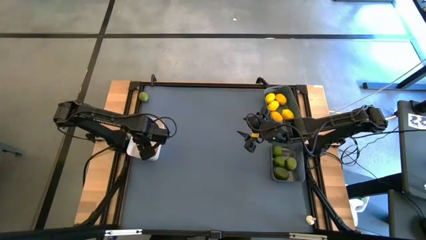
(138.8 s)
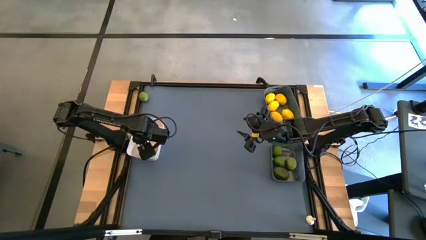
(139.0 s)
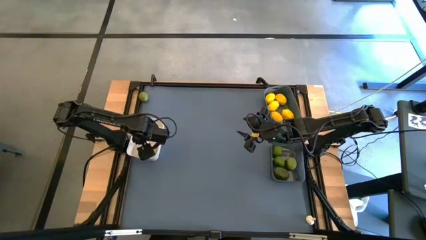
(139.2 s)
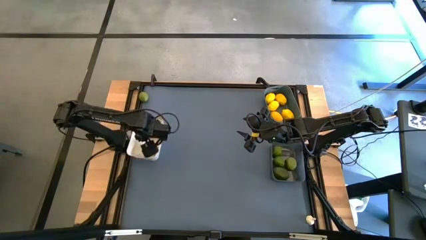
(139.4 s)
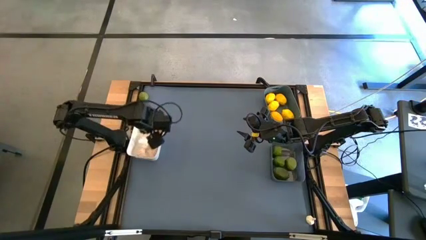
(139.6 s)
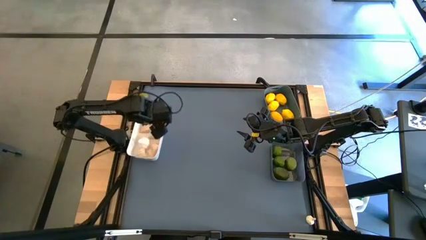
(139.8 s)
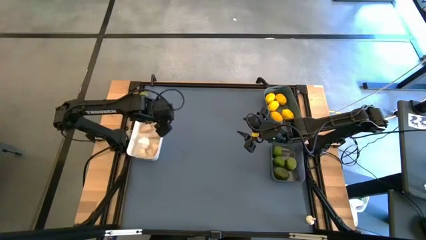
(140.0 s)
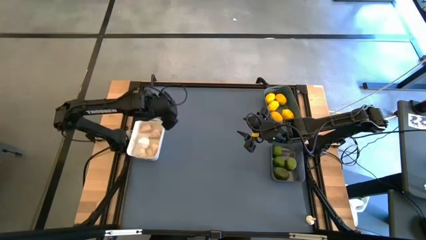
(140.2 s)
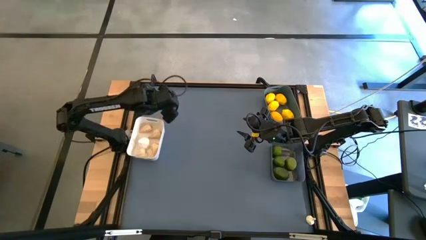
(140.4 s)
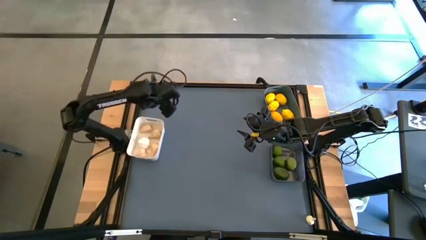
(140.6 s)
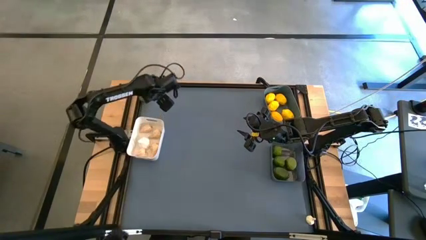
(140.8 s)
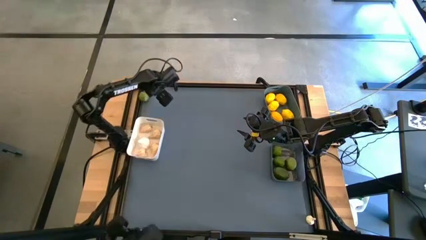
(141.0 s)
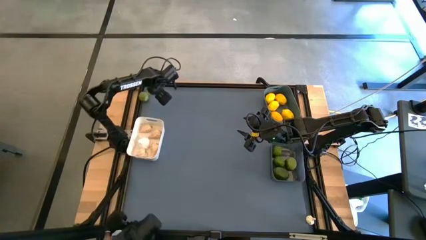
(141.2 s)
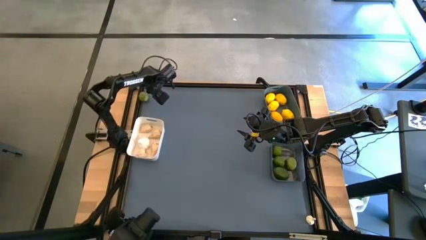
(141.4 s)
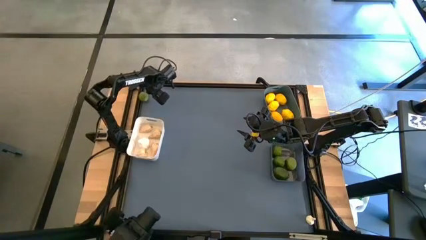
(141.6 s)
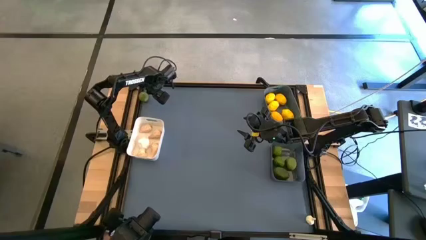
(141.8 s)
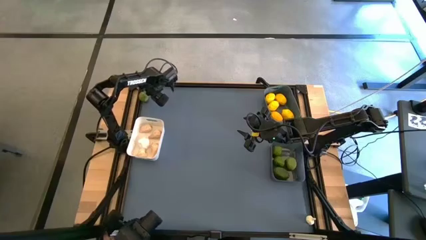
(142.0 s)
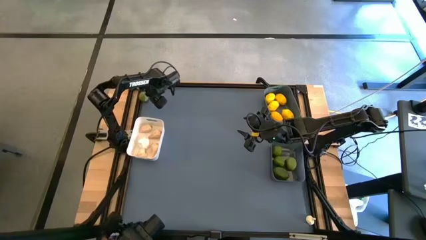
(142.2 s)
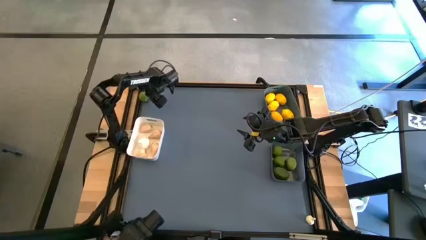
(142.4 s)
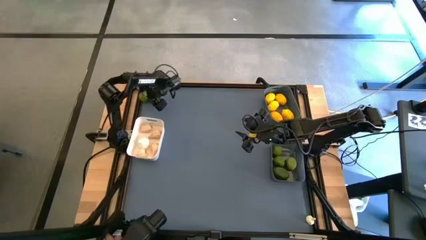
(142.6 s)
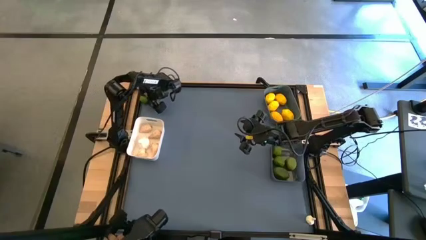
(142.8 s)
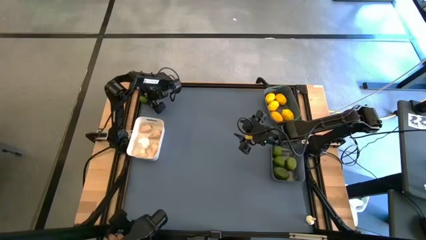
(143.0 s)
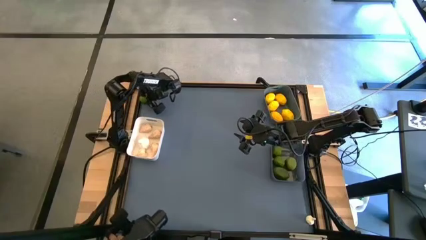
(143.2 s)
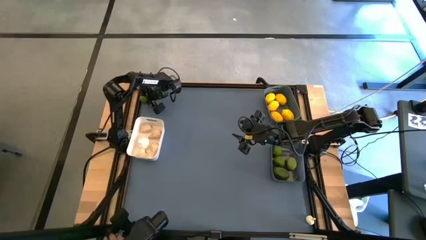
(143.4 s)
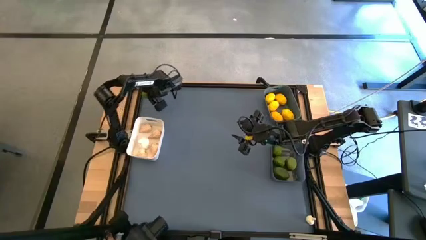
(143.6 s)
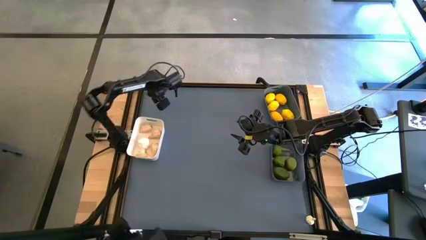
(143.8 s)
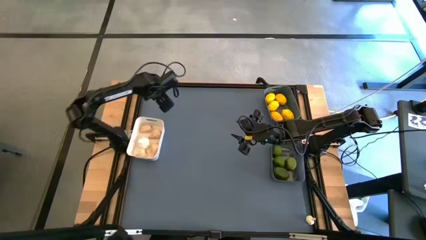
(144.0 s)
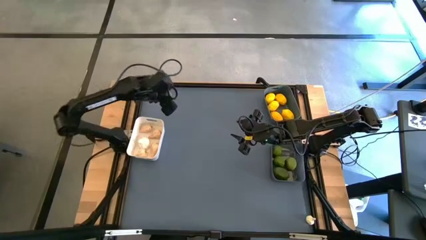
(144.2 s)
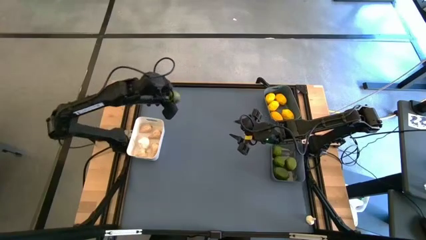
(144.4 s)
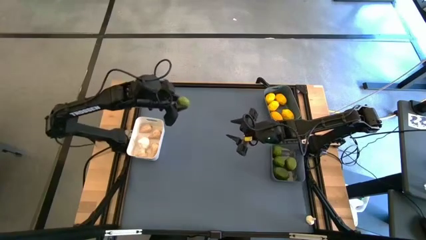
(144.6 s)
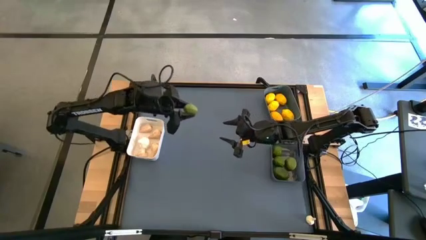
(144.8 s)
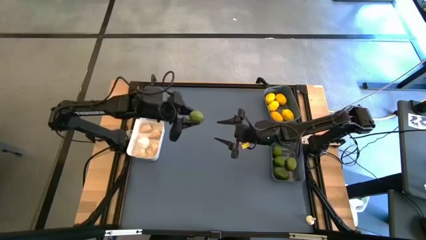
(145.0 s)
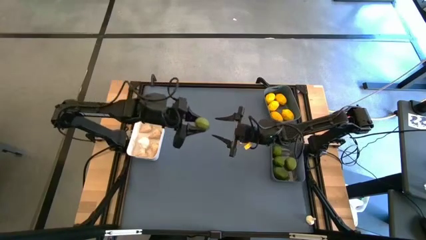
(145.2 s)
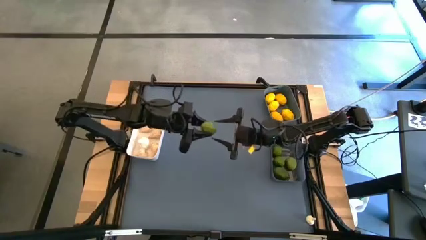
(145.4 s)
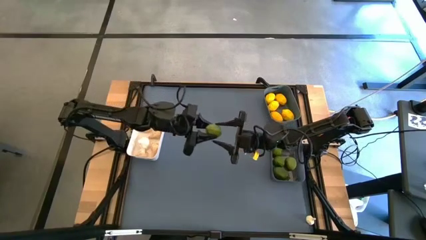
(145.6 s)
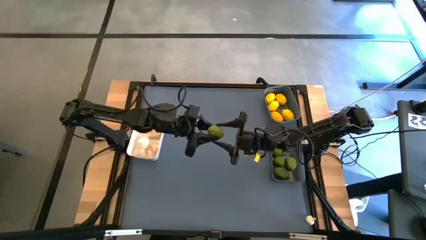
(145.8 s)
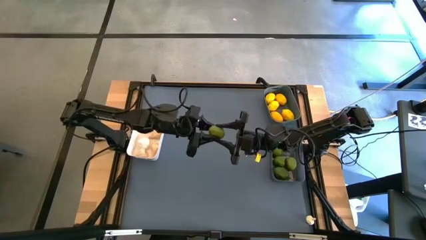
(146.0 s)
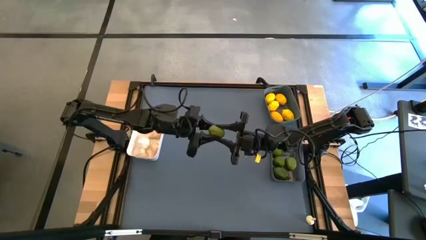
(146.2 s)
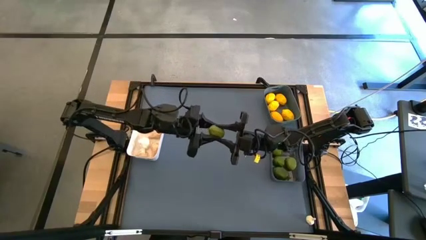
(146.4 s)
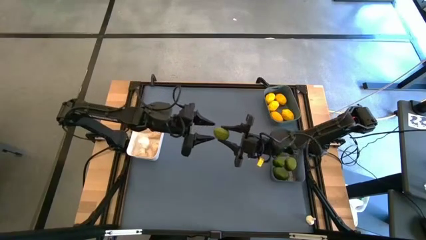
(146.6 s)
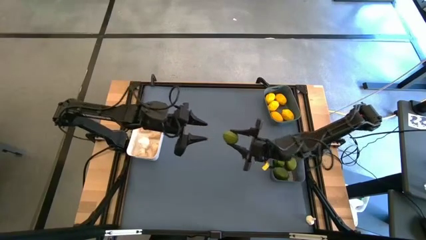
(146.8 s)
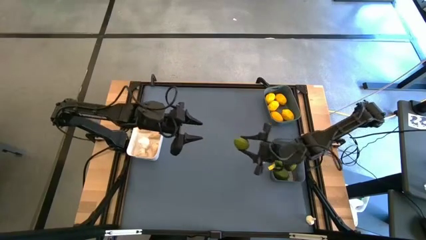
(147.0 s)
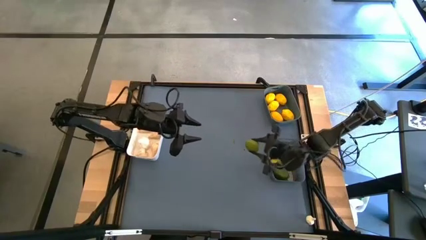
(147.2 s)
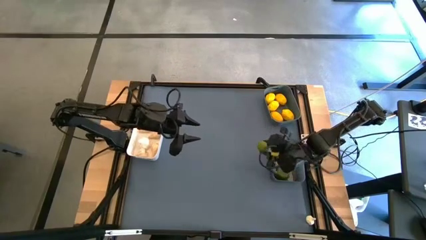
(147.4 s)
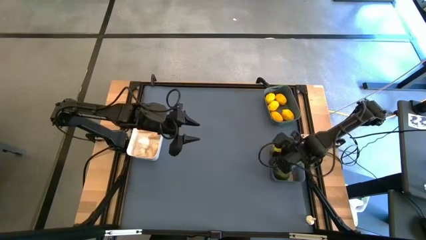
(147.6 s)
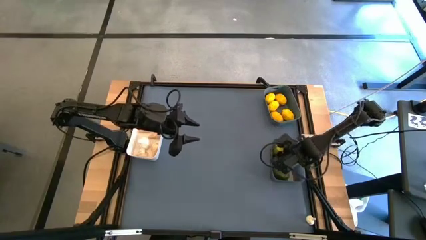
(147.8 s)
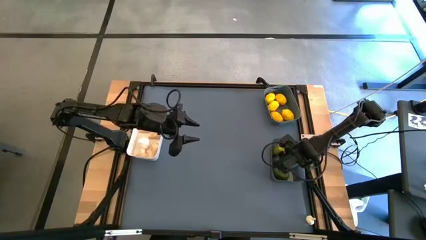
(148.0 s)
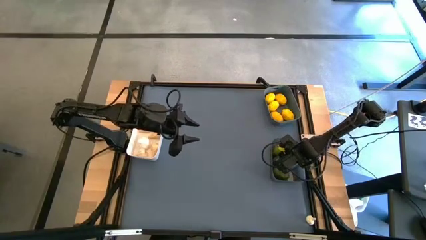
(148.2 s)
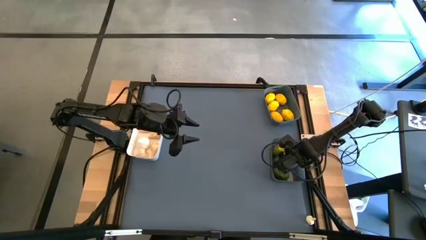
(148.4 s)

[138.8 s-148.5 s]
Task: Sort produce into baskets
Put the lime into the black bin

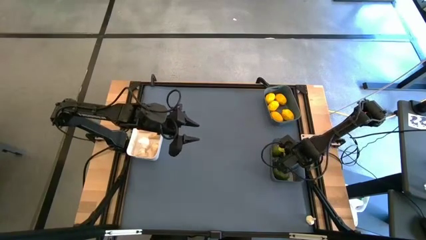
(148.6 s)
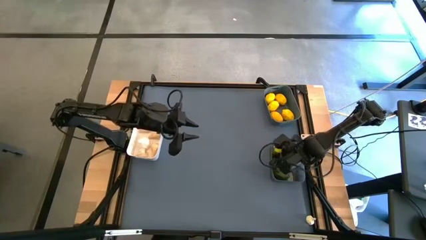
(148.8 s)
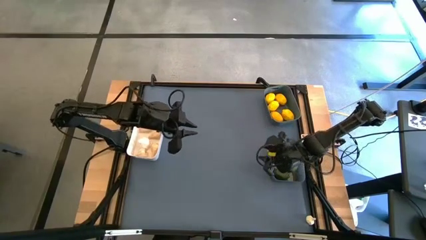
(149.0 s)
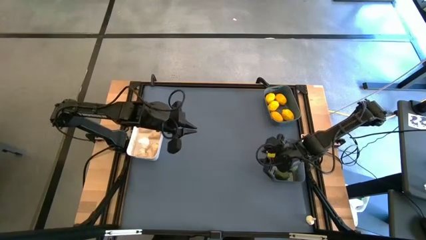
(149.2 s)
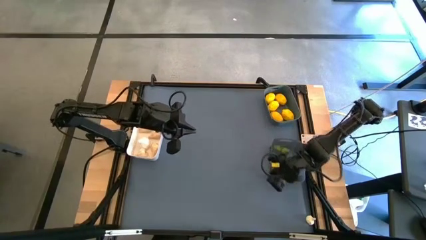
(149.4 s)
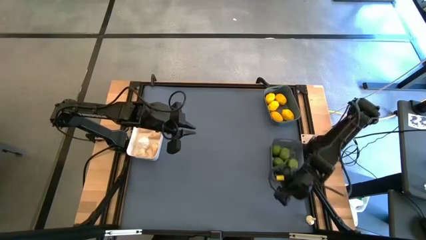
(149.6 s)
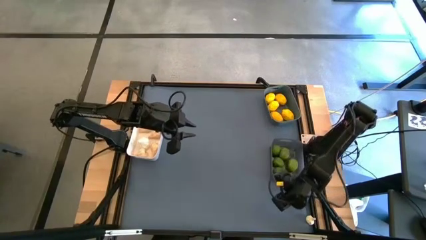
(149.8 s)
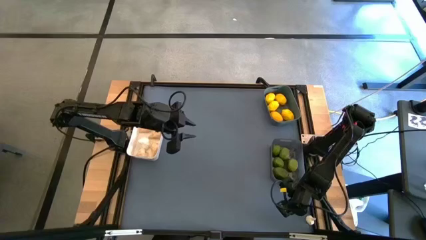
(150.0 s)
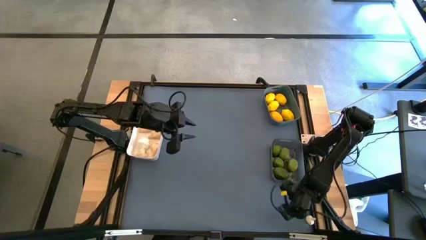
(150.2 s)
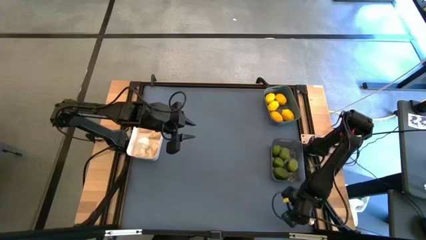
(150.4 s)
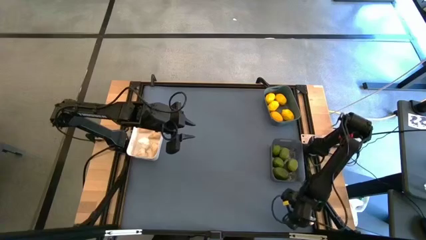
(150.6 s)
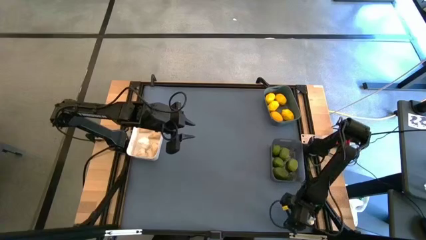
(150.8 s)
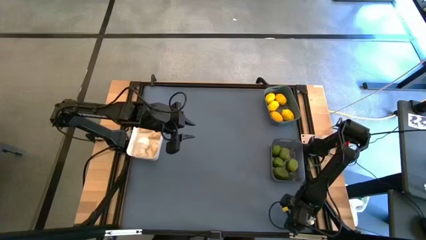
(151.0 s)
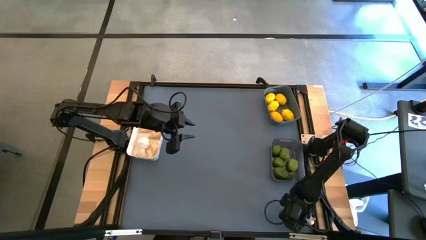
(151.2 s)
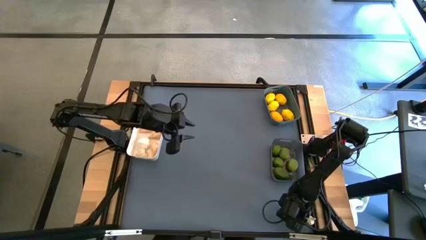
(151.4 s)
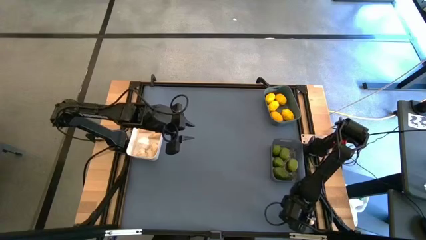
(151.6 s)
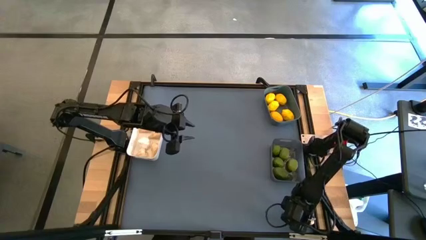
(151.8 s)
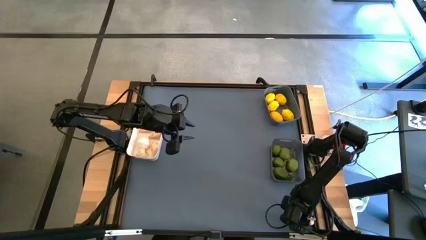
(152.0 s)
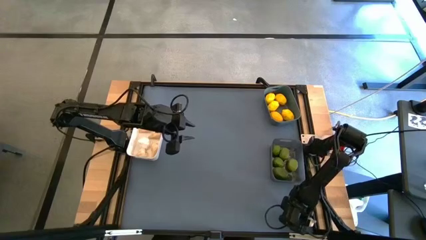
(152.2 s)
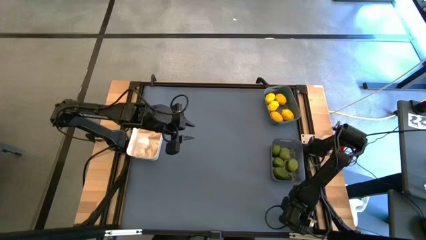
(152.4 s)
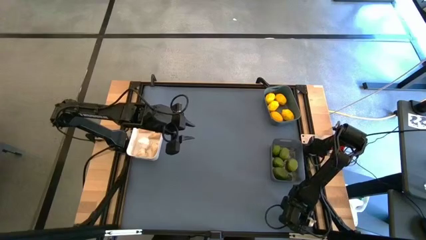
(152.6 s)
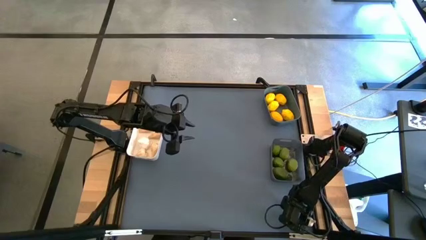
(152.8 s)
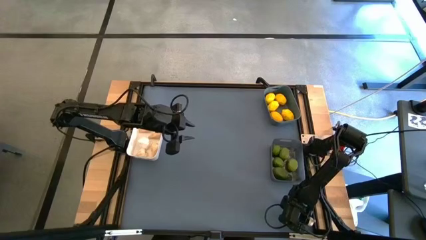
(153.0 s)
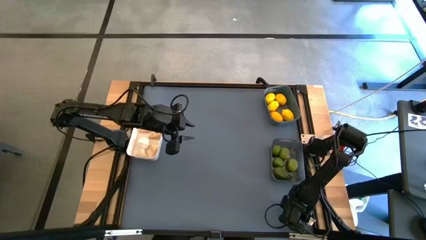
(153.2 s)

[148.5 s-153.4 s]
Put the garlic into the white bin

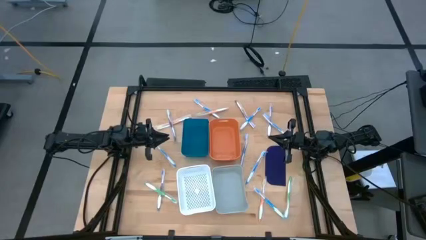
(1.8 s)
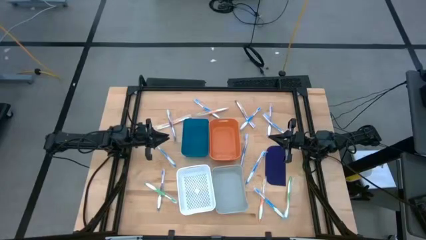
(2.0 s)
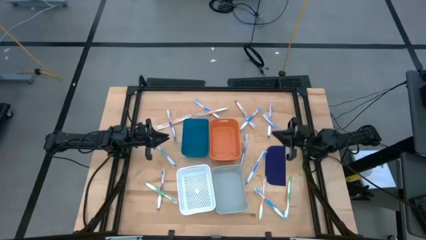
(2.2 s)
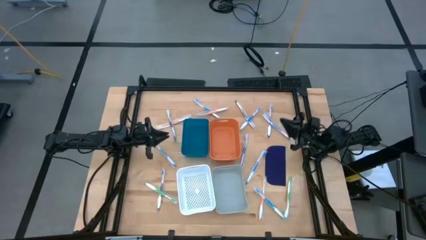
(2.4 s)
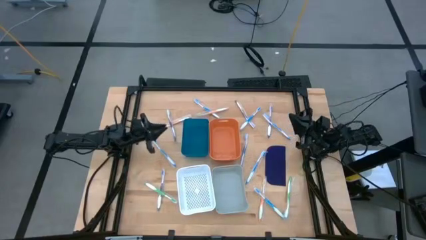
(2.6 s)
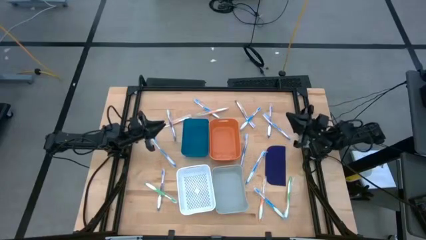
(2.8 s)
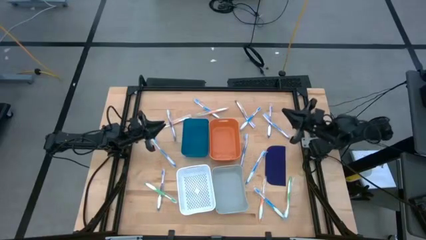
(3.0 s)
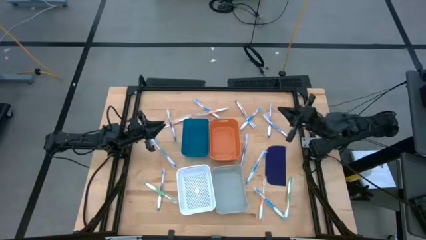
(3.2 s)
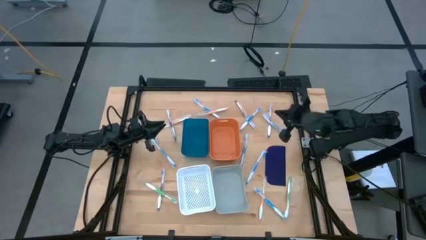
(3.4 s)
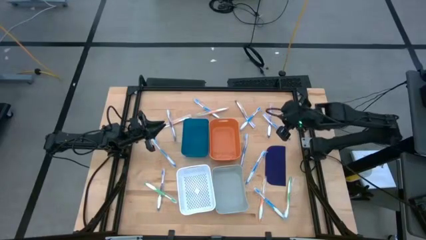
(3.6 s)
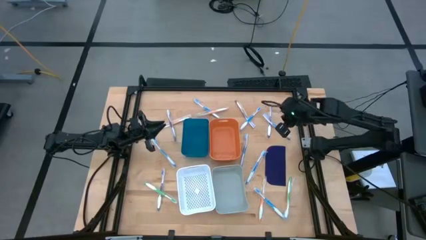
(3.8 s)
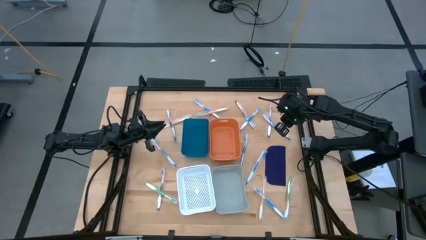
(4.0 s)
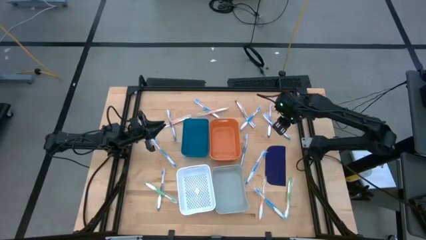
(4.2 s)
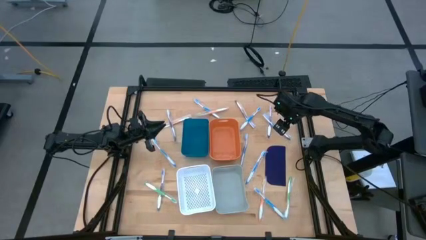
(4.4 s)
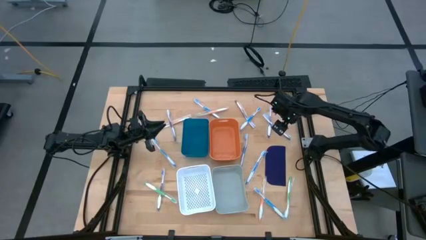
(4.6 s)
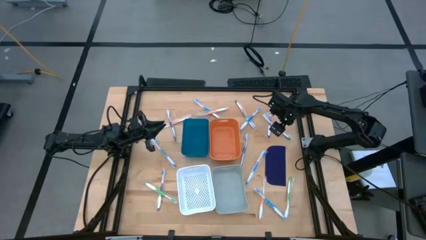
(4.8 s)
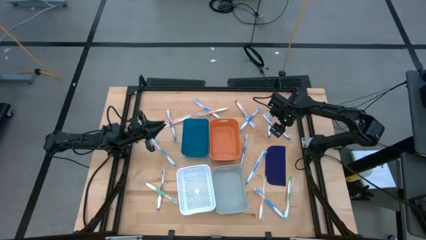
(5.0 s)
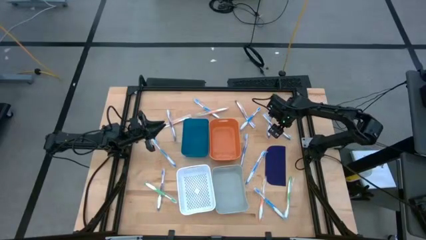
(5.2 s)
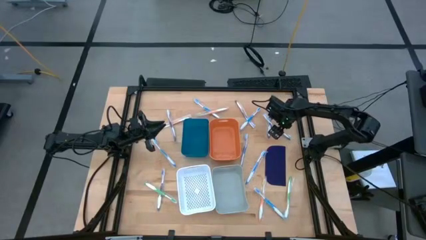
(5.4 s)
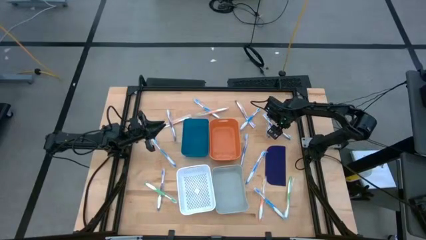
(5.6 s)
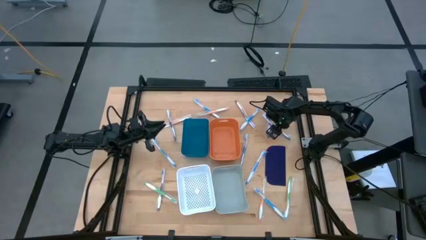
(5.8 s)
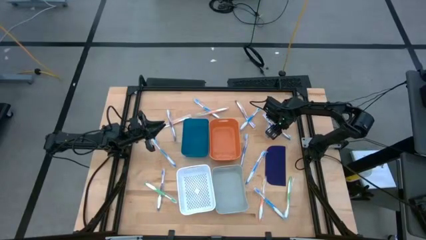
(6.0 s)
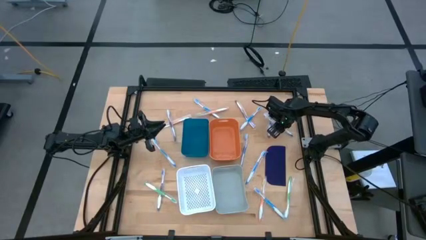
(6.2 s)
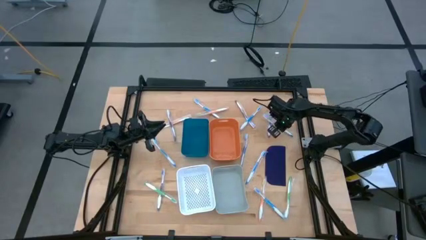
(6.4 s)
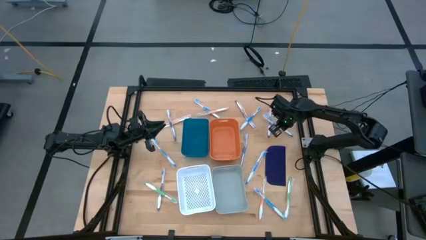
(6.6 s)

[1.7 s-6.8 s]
Task: Pick & Place Toothbrushes
Put the blue toothbrush into the blue bin
